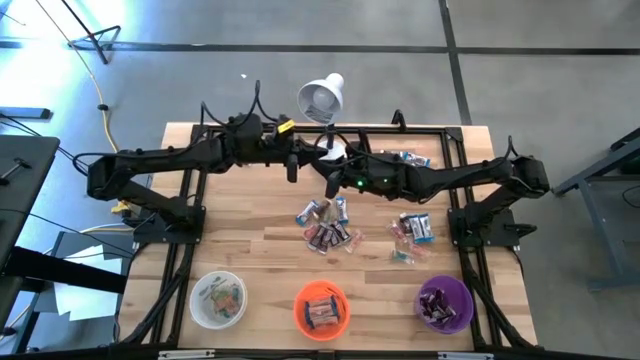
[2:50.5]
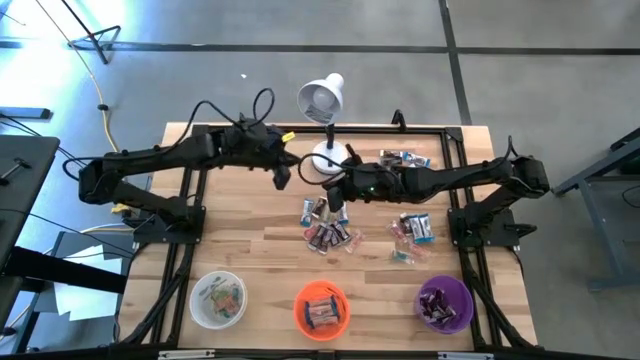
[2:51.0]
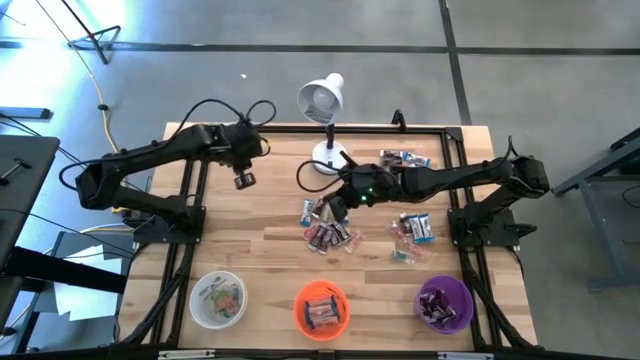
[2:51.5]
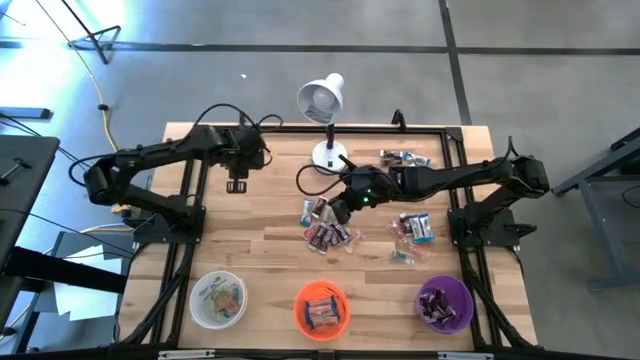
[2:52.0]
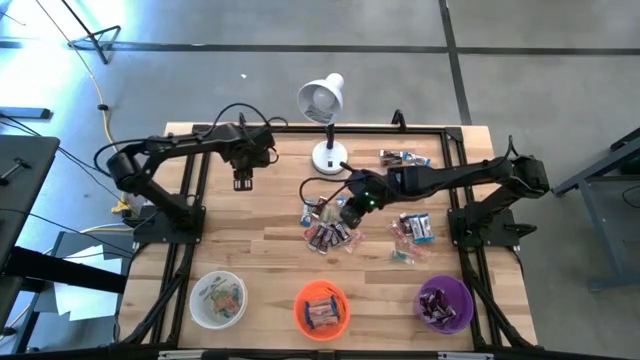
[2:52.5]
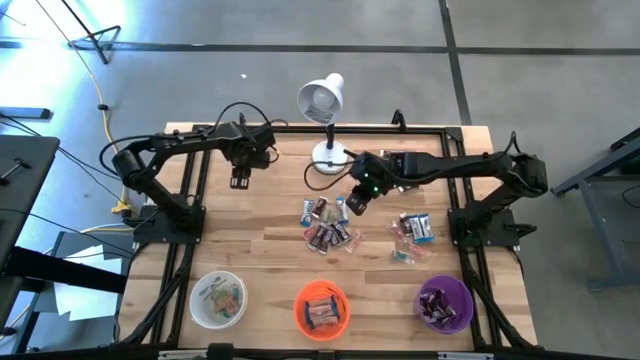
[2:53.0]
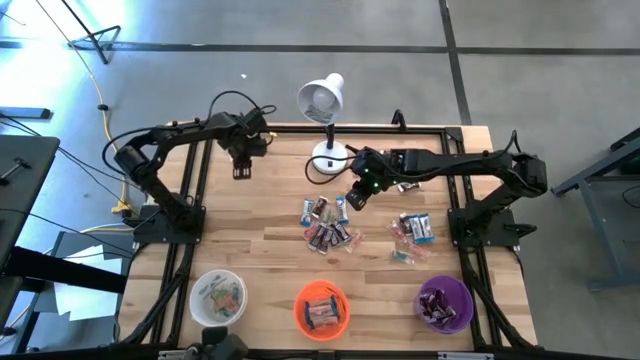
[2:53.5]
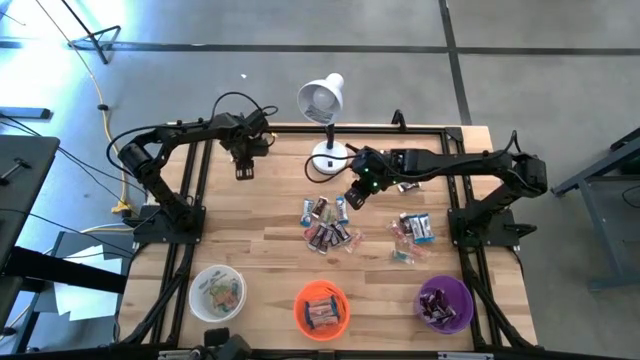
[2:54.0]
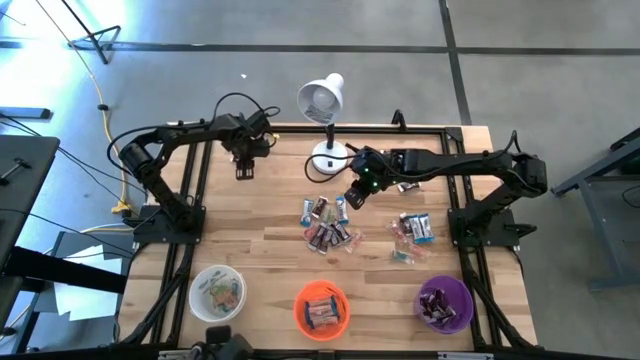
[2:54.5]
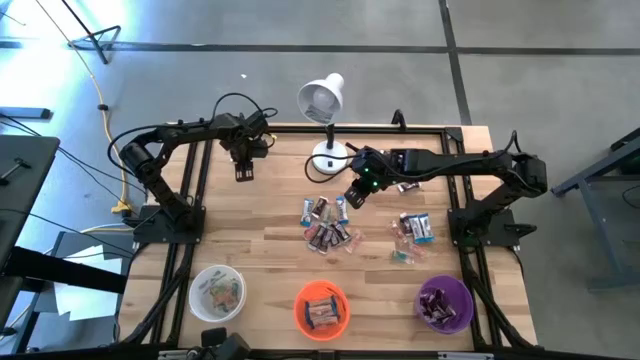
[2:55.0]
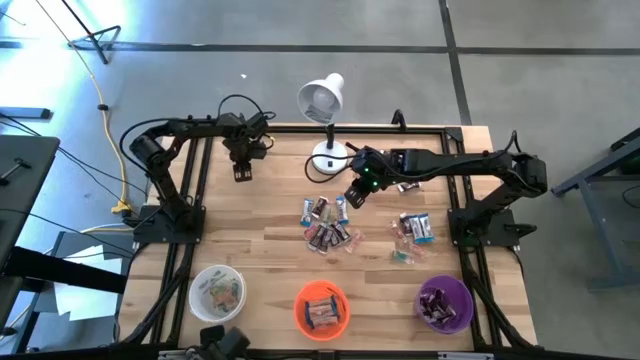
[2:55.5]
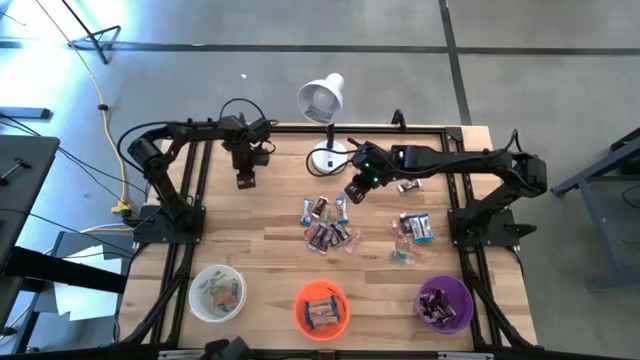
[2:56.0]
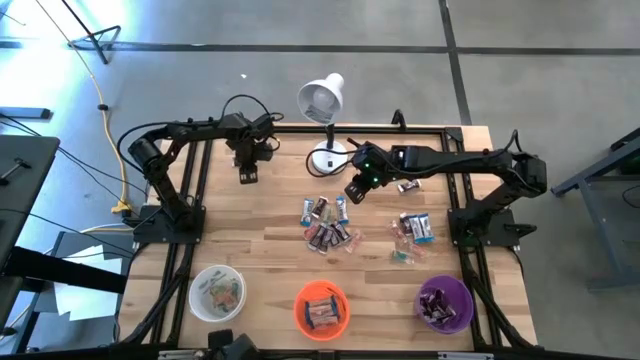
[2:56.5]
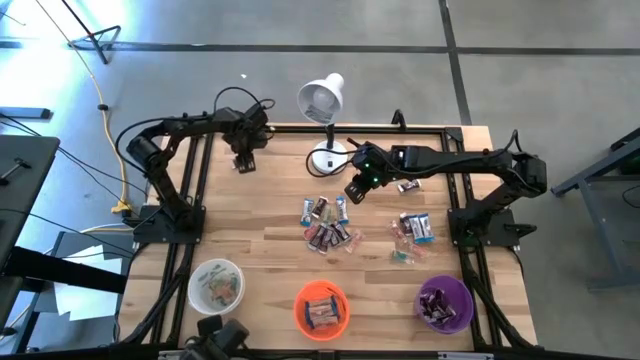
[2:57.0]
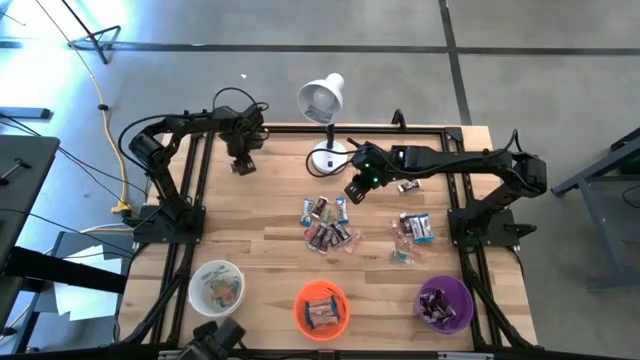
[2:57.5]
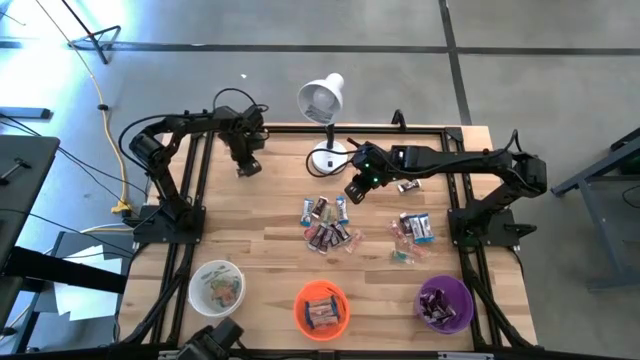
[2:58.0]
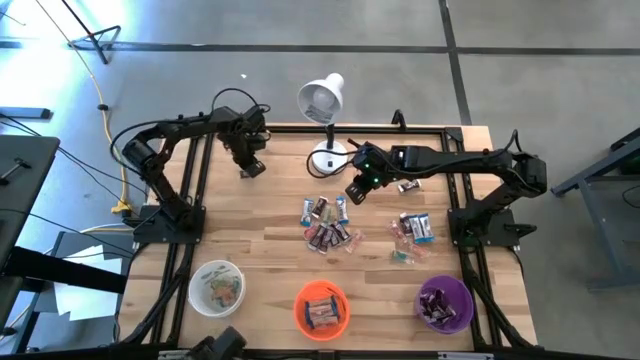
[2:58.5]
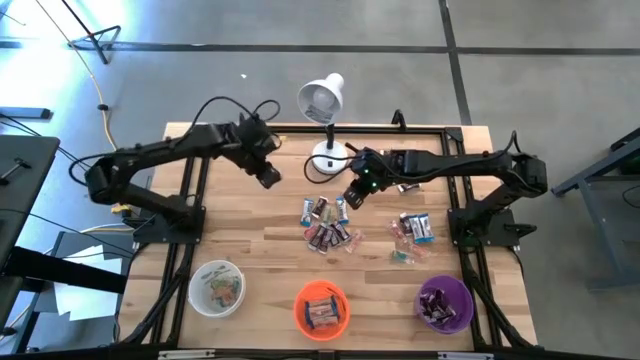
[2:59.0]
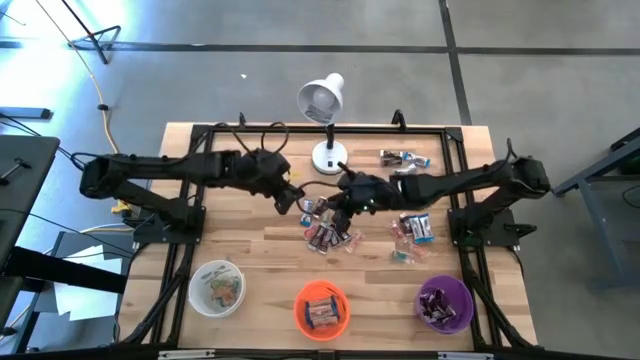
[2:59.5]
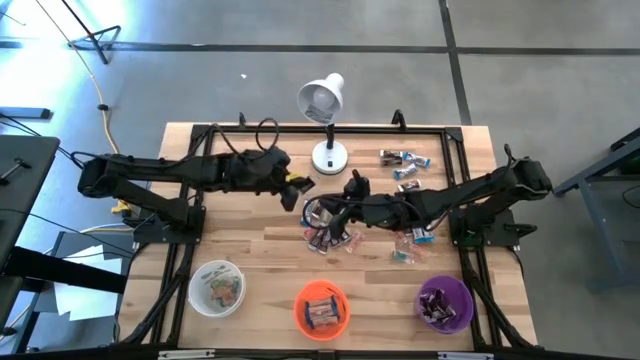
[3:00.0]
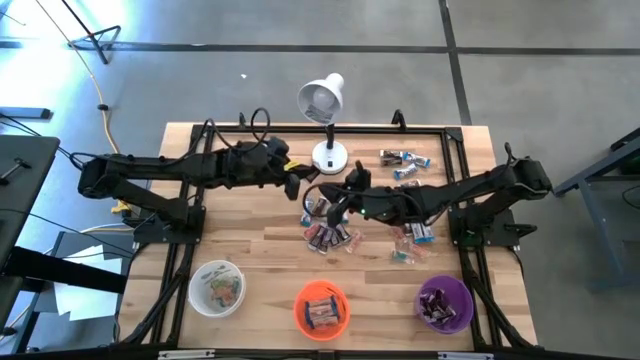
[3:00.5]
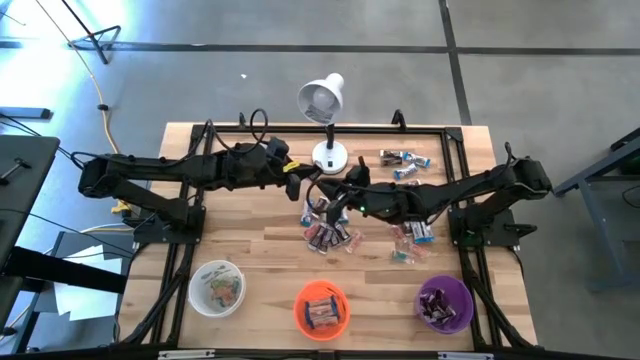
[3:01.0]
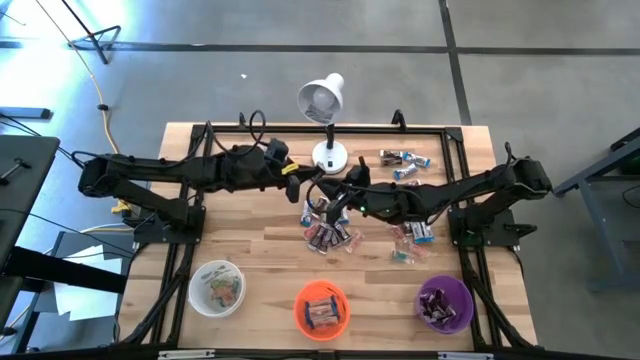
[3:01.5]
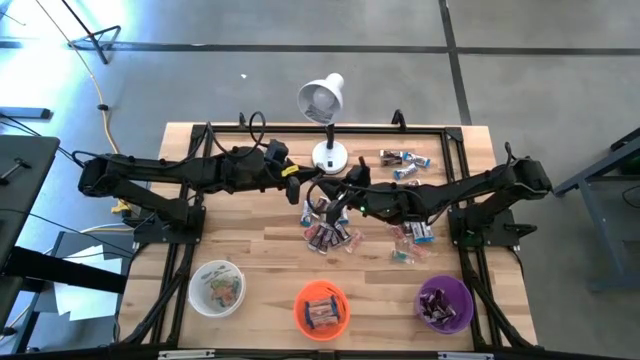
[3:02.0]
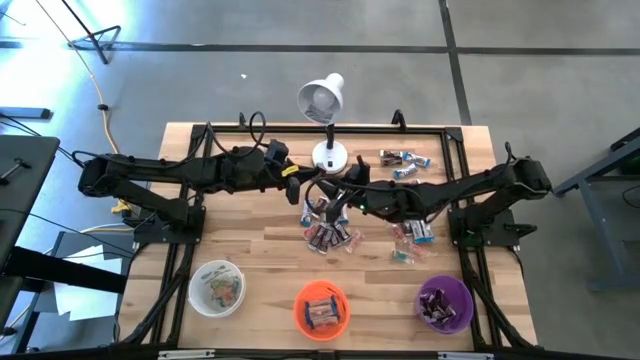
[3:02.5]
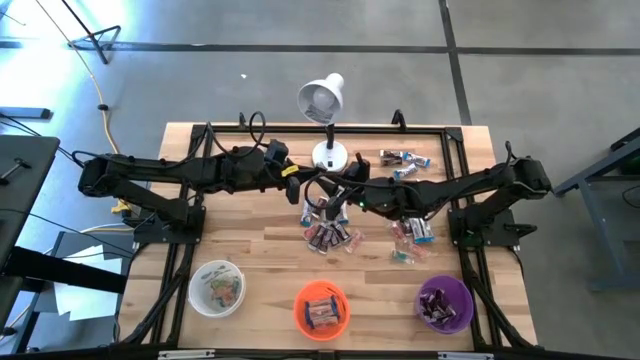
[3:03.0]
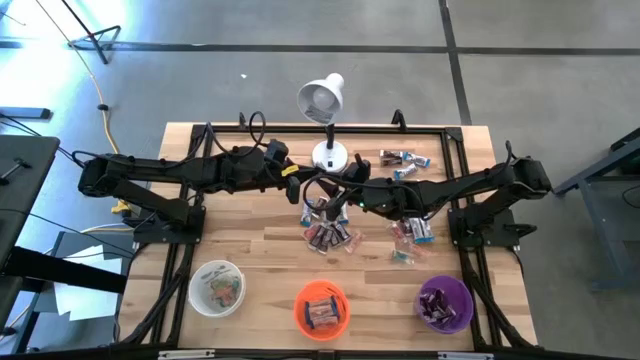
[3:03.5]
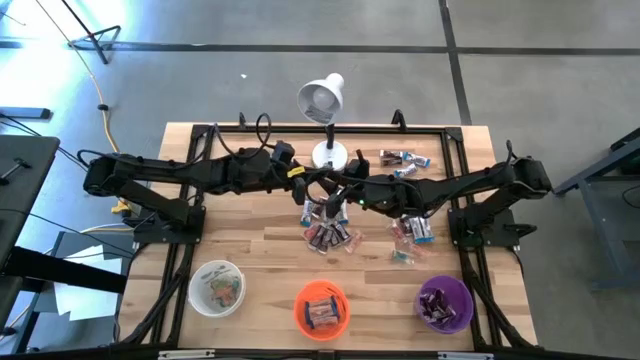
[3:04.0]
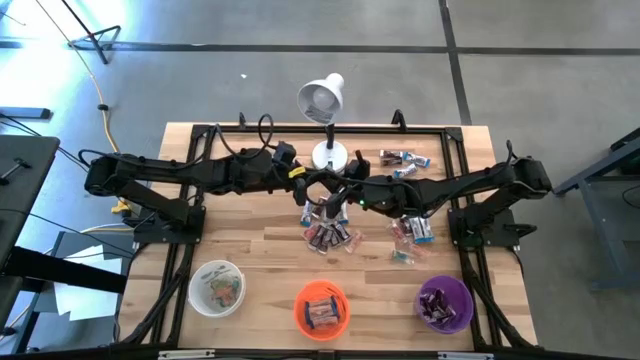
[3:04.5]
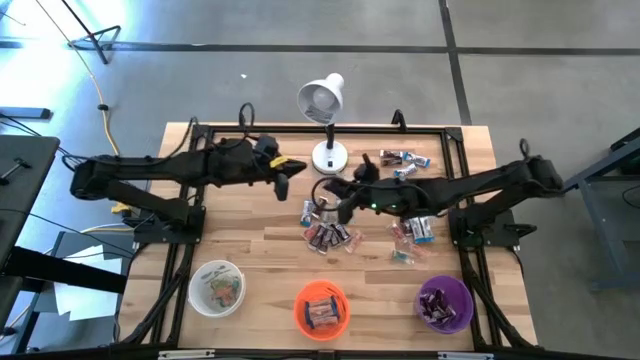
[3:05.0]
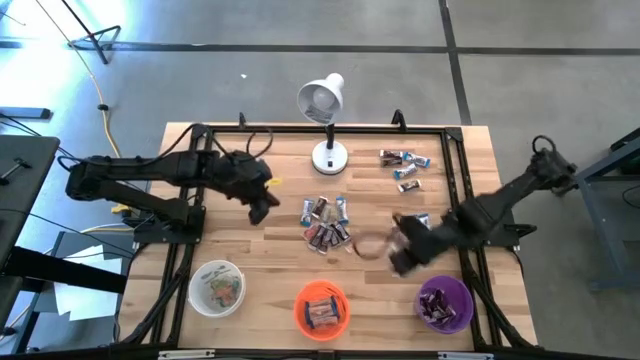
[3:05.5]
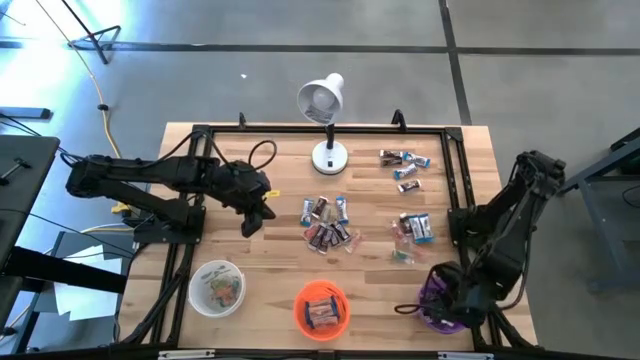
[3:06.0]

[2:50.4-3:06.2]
Task: Organize candy in baskets
Put the brown chocolate bar into the purple bucket

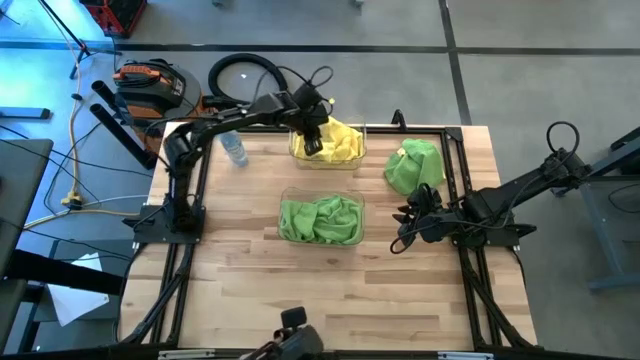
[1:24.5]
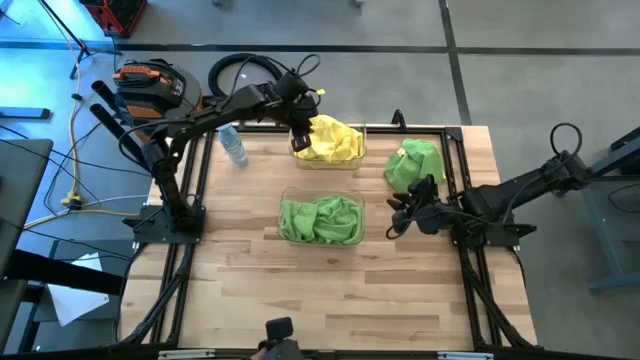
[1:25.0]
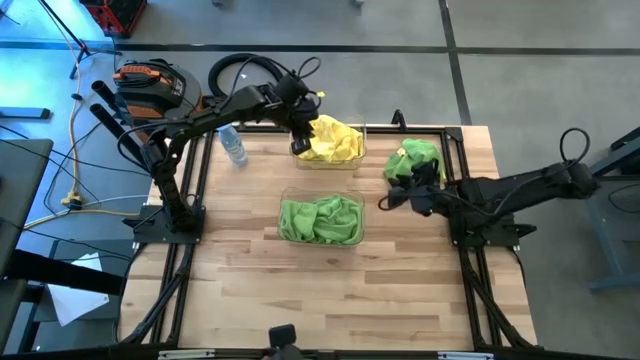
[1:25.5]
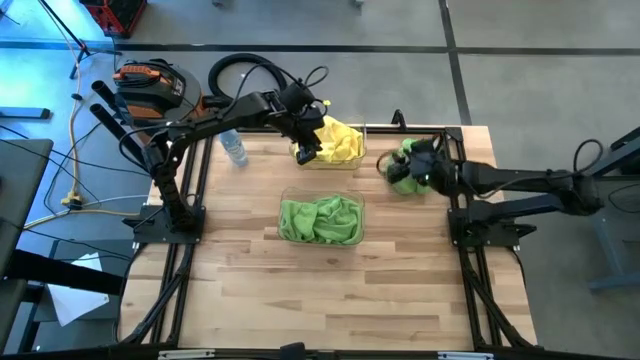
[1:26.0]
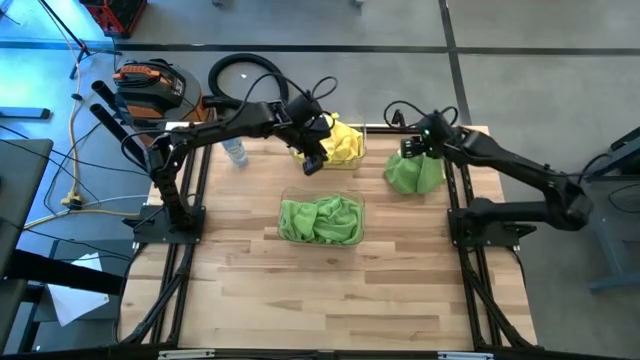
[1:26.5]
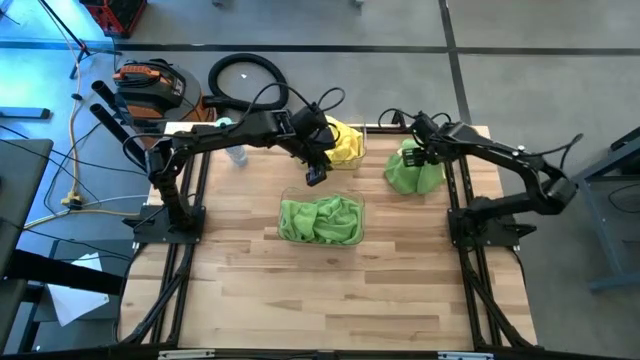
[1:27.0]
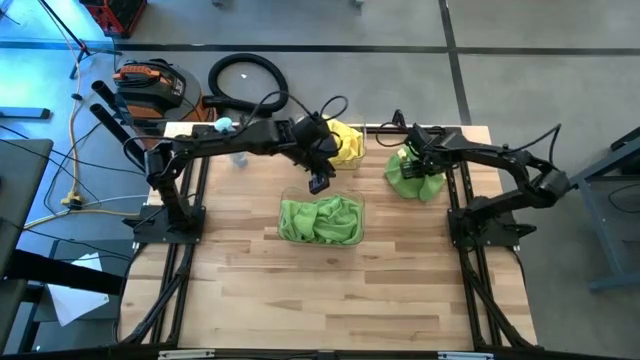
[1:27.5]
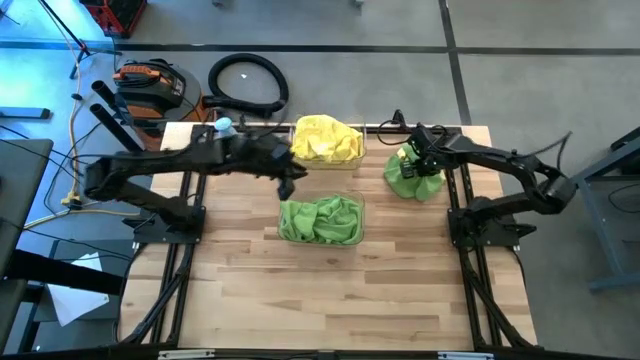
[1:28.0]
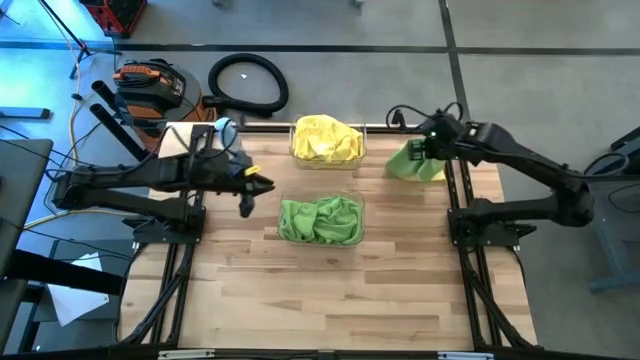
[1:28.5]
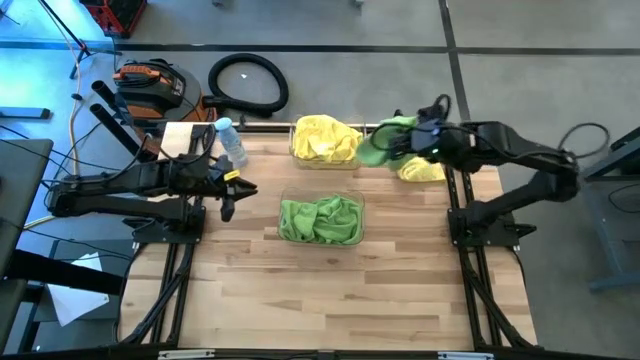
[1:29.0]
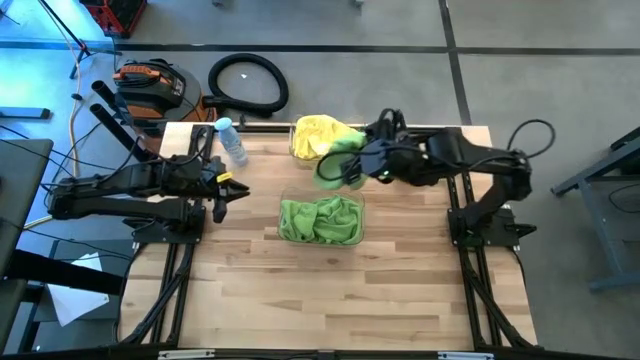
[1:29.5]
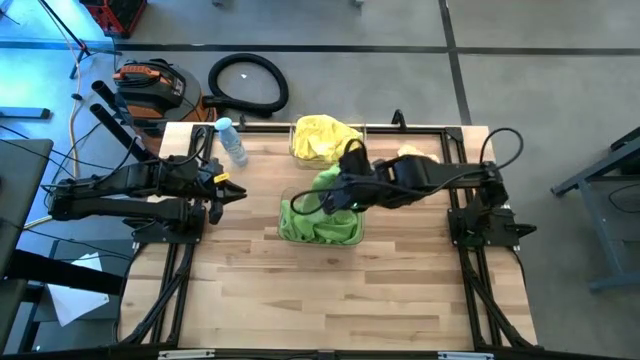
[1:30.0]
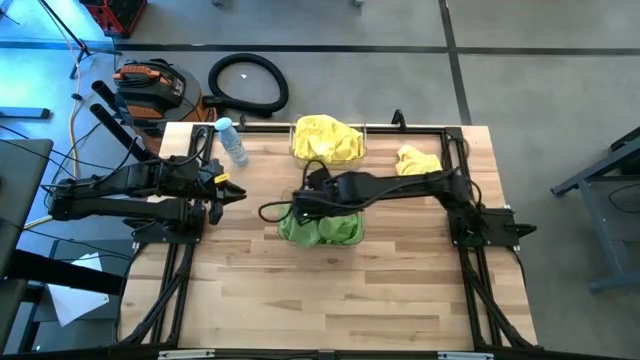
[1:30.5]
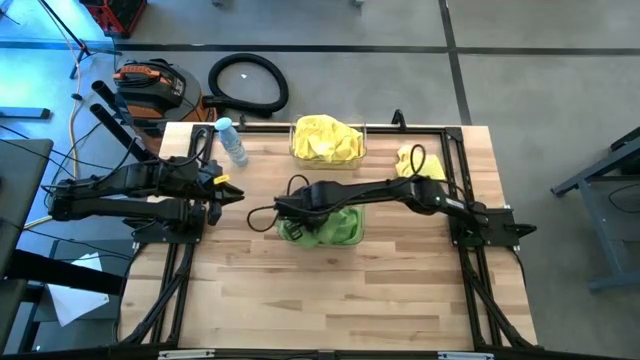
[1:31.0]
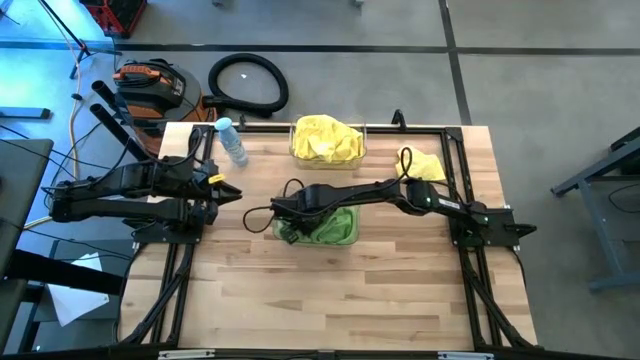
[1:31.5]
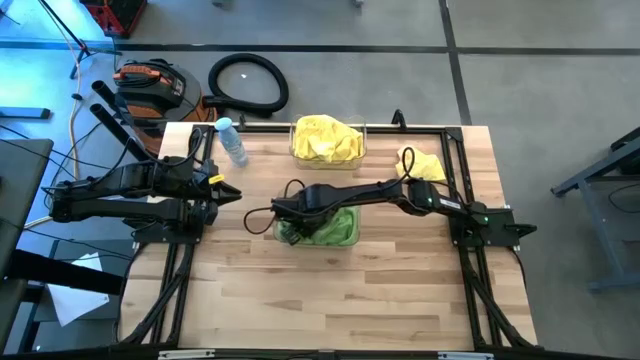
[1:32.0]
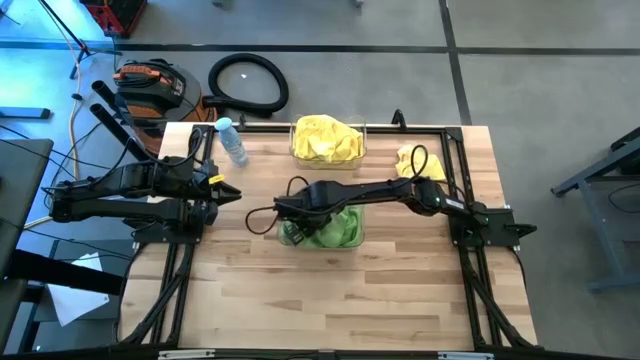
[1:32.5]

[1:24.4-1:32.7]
Task: Sort microfiber towel by color & place in baskets
Put the green towel into the bottom transparent bin
